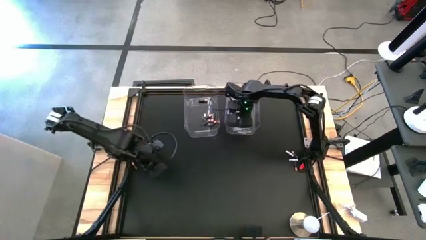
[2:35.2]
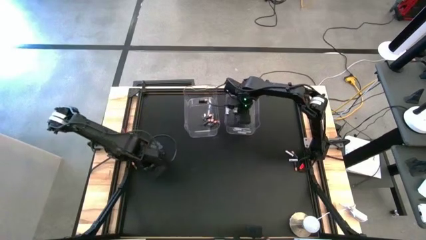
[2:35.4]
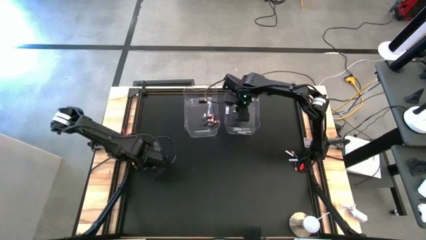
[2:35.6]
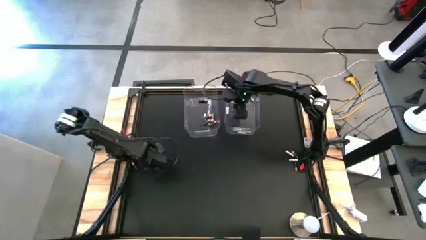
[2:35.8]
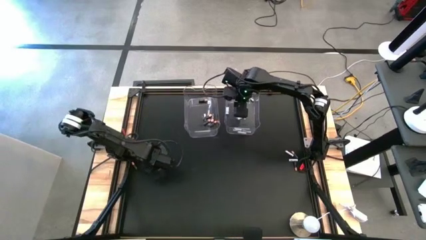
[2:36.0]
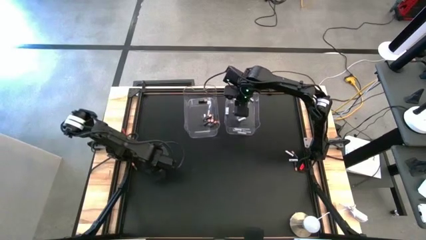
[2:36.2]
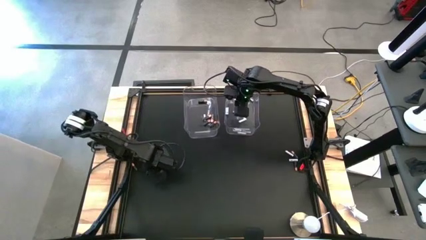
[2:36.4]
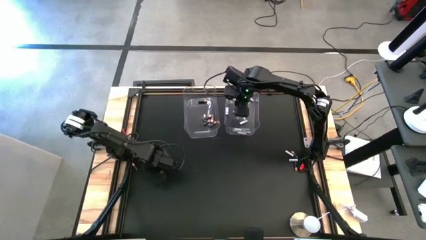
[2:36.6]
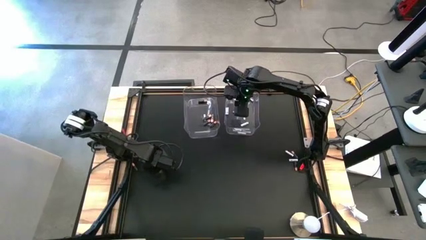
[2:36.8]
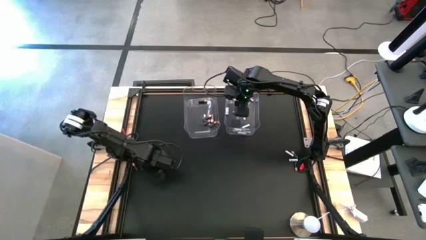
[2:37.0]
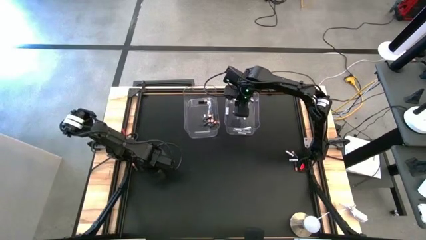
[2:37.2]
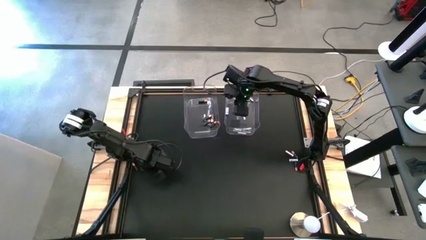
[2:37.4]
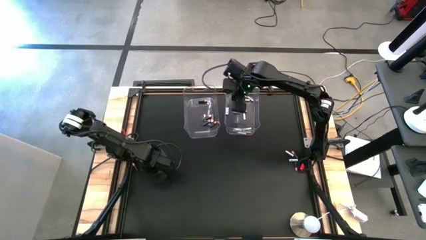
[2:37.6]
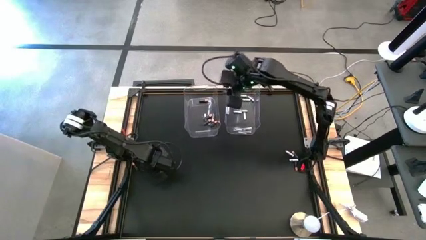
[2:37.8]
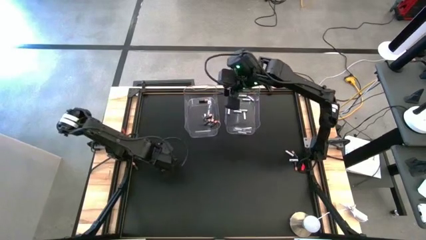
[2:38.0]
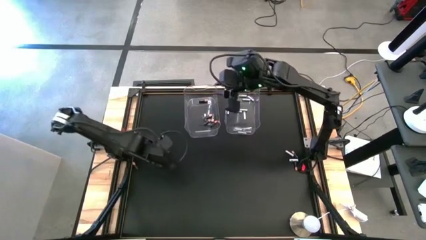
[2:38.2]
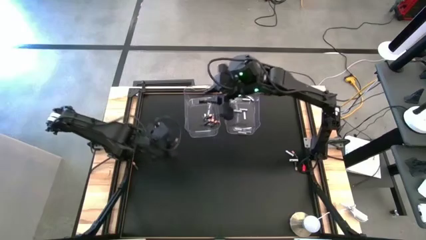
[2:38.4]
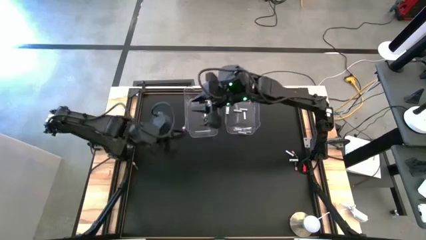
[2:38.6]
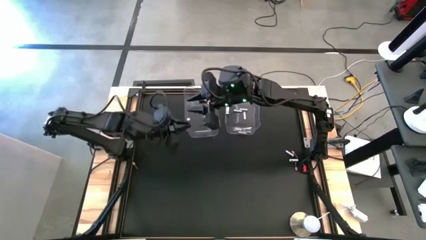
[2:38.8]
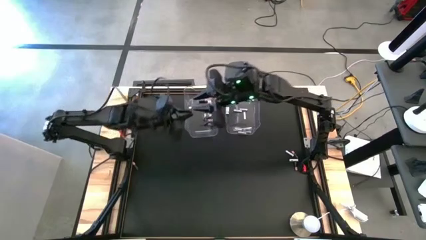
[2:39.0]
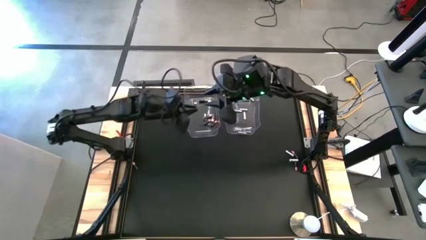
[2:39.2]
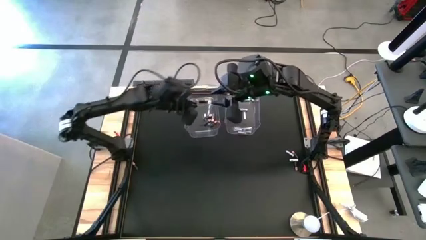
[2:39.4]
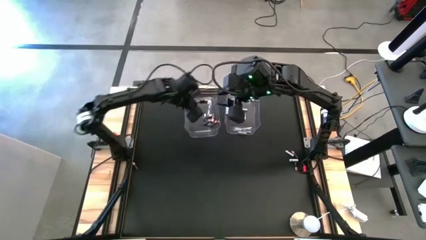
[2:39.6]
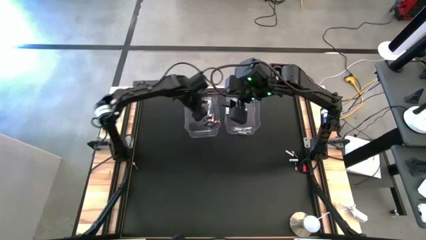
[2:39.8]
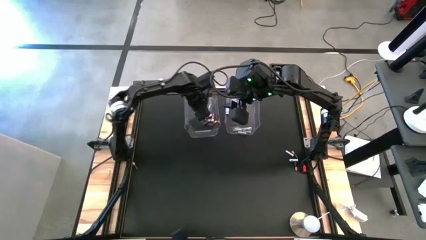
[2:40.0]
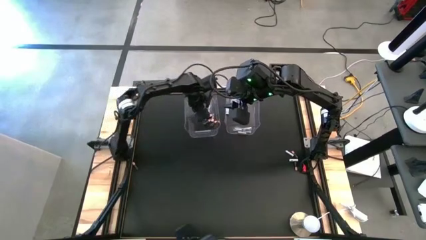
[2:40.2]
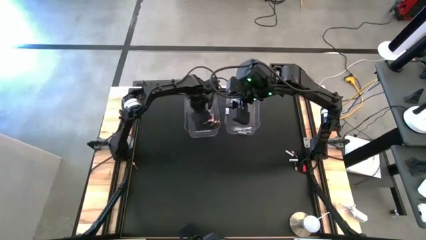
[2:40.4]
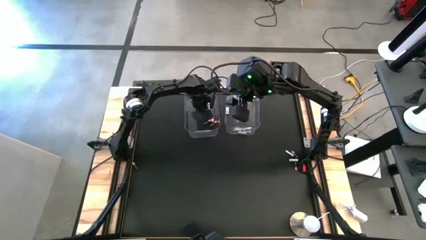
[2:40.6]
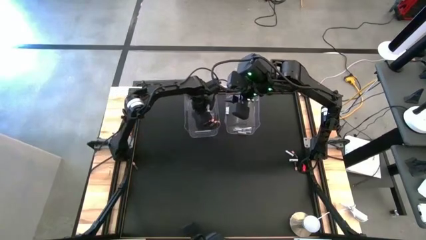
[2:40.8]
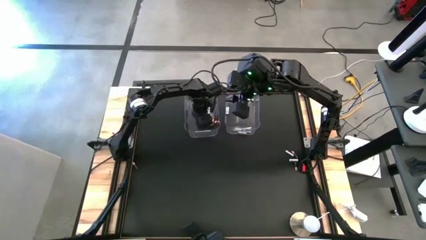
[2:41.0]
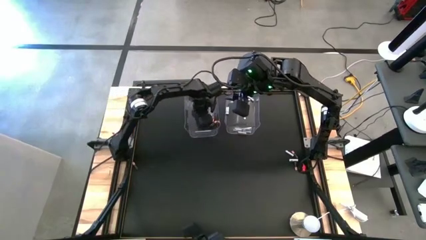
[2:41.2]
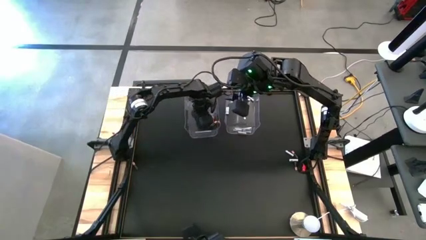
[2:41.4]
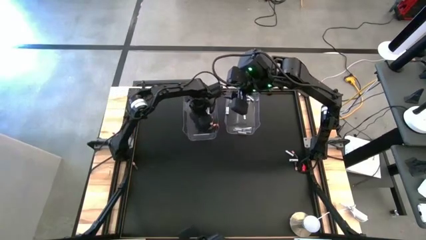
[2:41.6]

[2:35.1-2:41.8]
Task: Sort batteries
Put the black battery into the left transparent bin

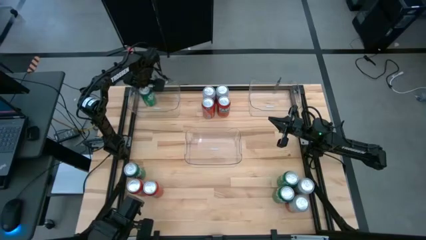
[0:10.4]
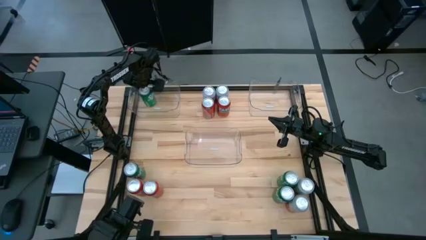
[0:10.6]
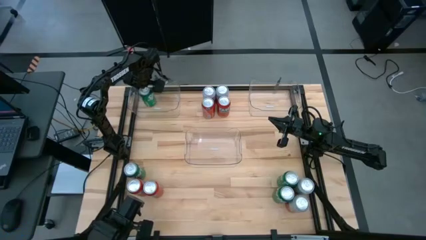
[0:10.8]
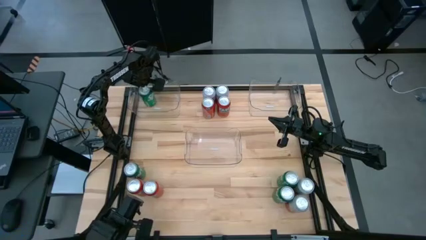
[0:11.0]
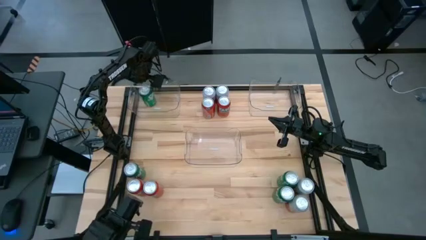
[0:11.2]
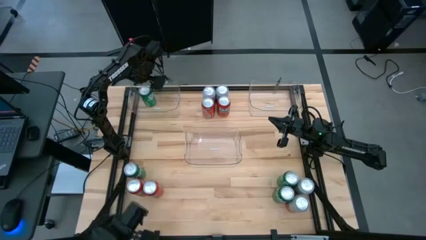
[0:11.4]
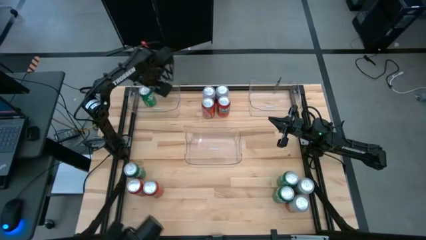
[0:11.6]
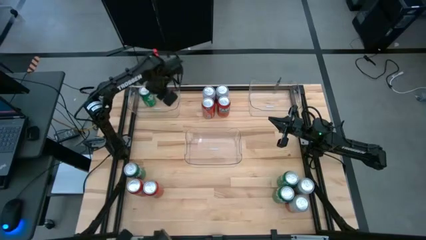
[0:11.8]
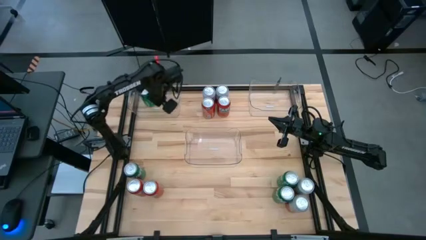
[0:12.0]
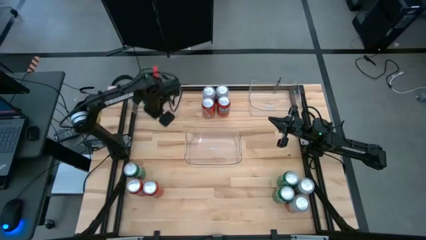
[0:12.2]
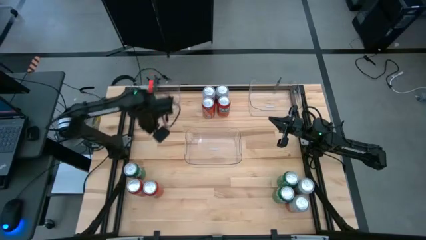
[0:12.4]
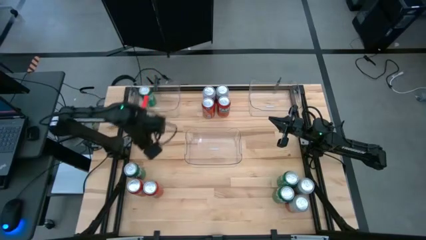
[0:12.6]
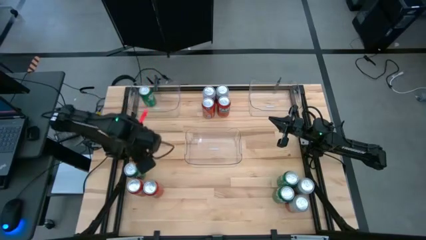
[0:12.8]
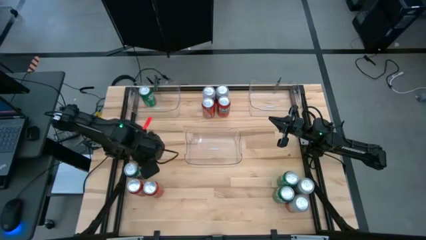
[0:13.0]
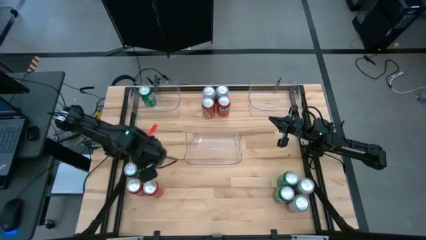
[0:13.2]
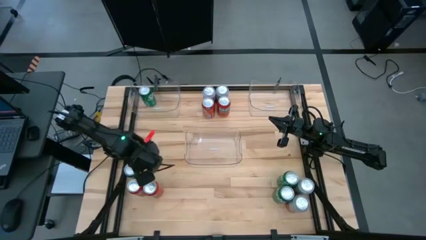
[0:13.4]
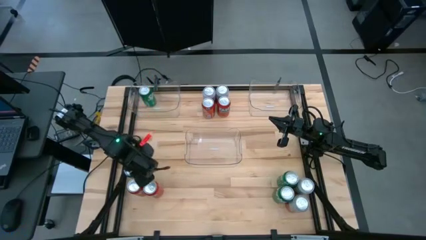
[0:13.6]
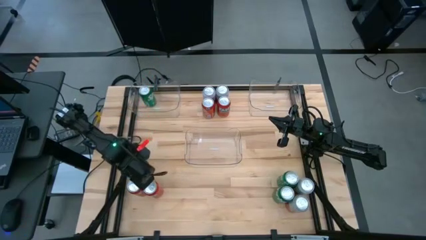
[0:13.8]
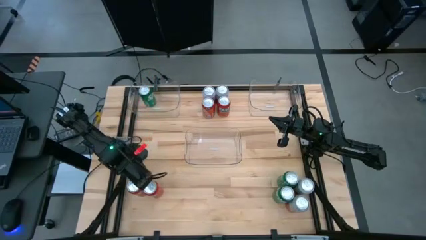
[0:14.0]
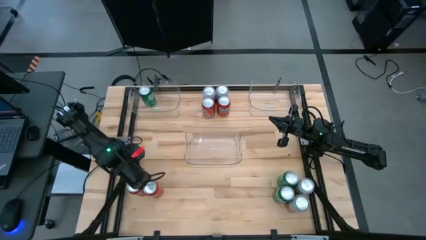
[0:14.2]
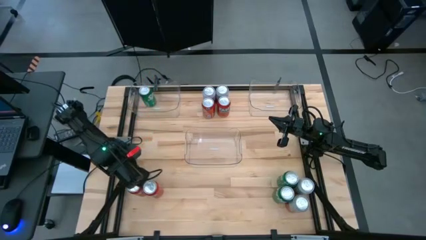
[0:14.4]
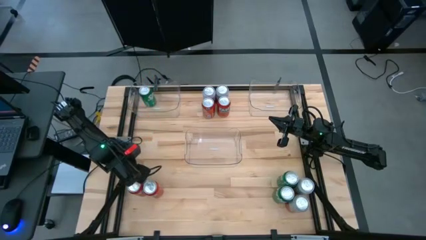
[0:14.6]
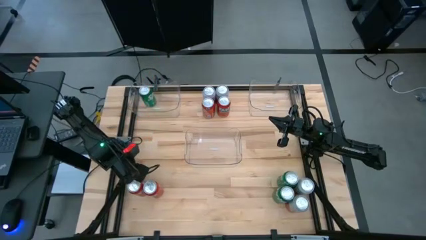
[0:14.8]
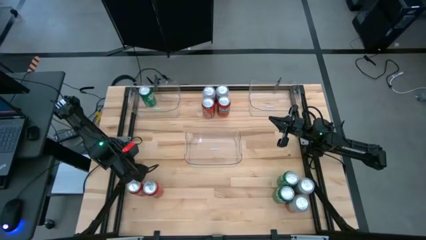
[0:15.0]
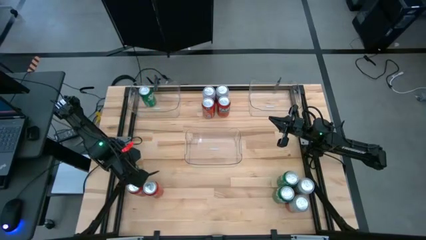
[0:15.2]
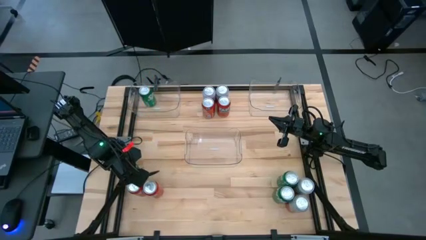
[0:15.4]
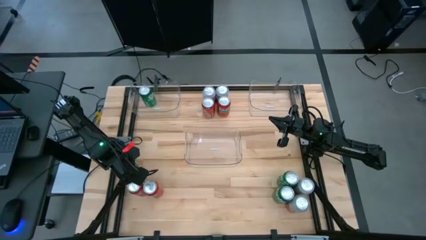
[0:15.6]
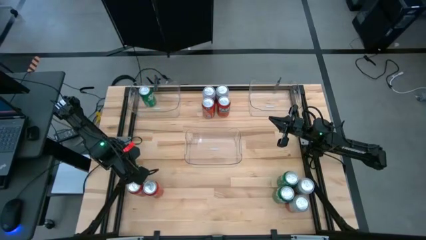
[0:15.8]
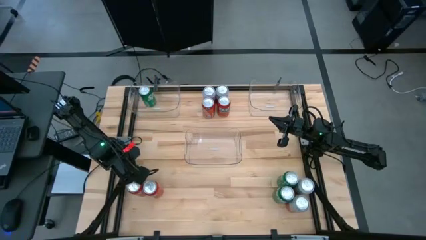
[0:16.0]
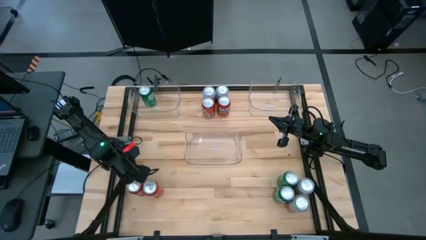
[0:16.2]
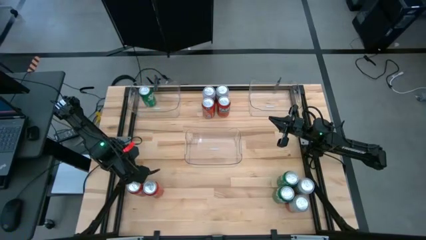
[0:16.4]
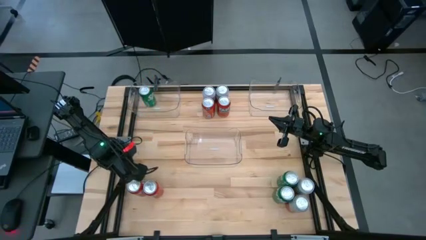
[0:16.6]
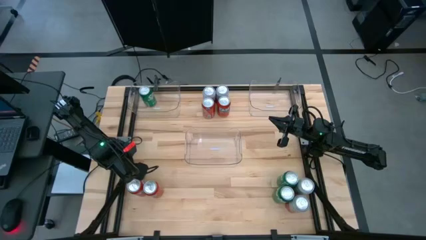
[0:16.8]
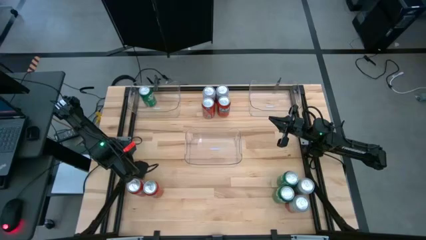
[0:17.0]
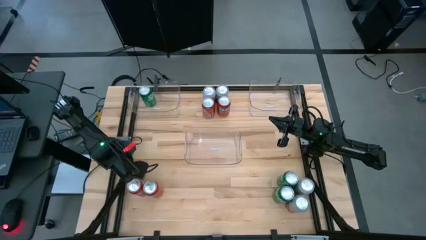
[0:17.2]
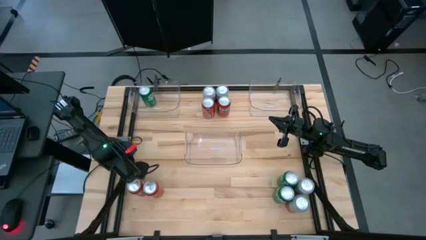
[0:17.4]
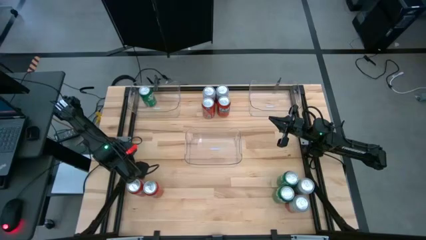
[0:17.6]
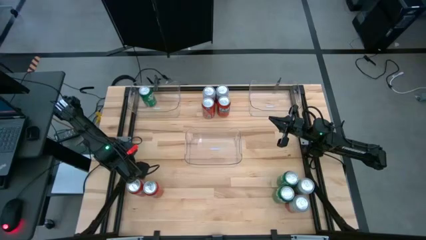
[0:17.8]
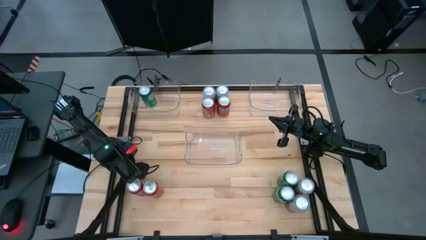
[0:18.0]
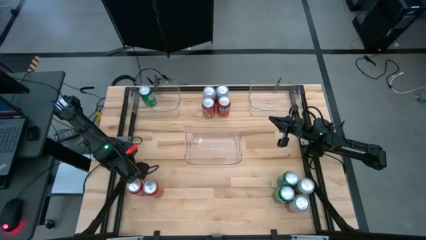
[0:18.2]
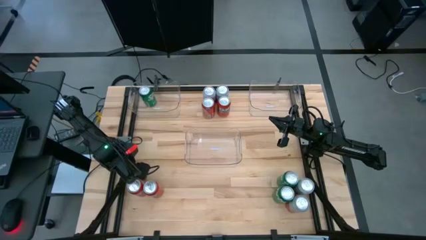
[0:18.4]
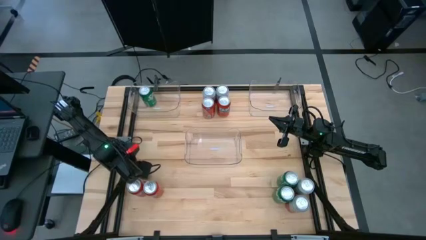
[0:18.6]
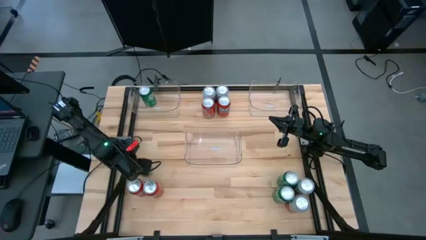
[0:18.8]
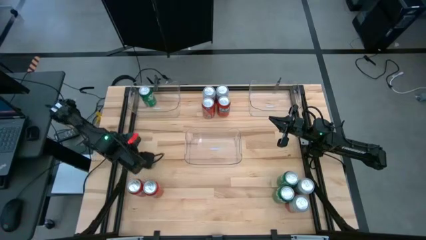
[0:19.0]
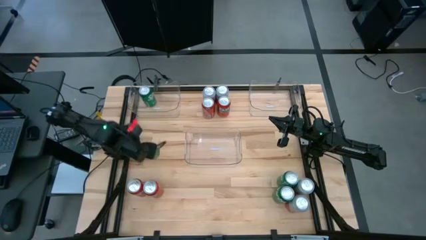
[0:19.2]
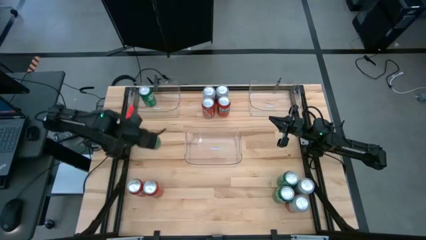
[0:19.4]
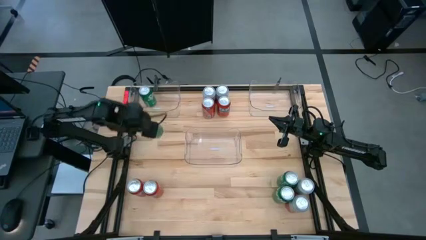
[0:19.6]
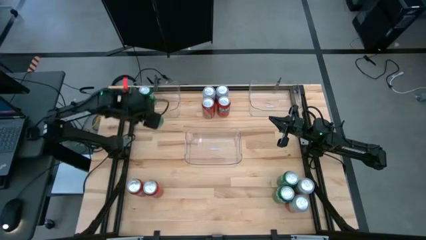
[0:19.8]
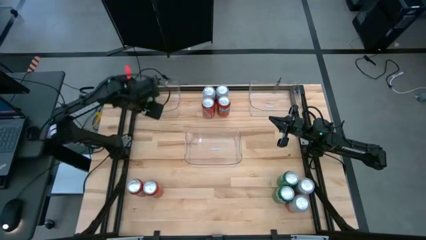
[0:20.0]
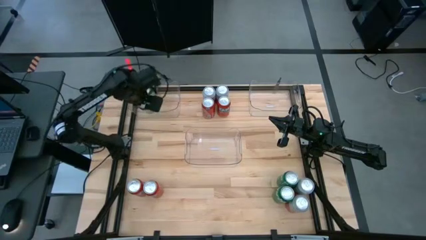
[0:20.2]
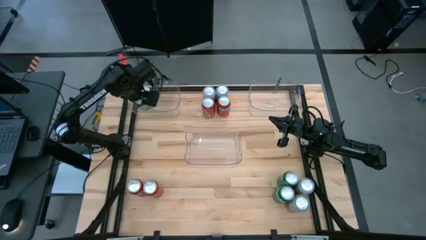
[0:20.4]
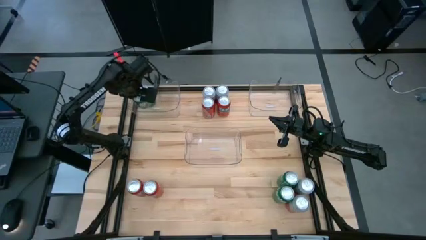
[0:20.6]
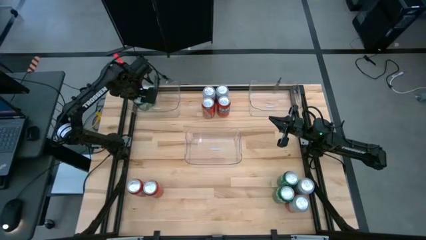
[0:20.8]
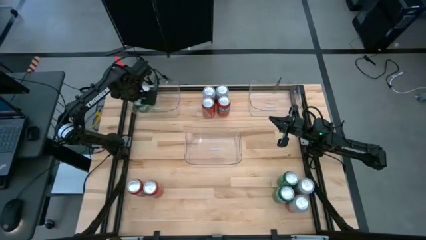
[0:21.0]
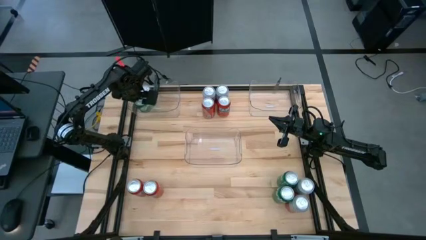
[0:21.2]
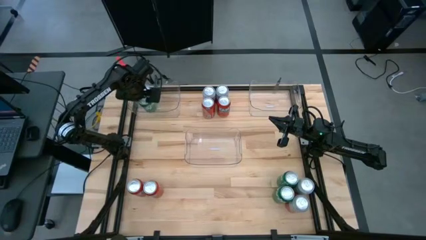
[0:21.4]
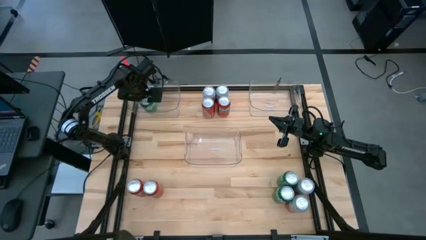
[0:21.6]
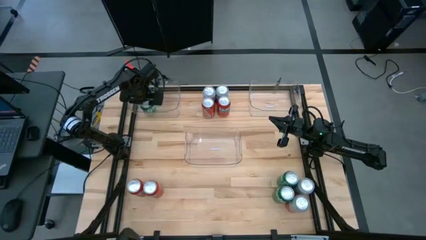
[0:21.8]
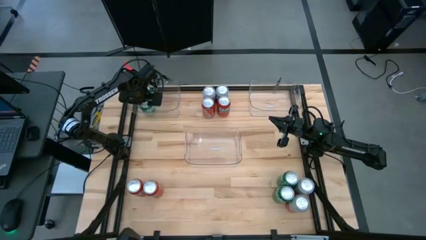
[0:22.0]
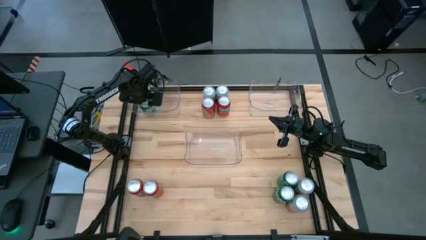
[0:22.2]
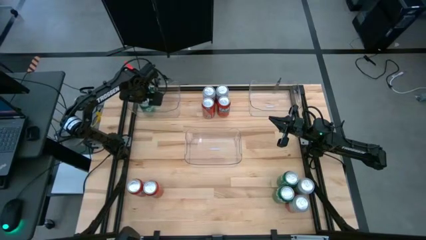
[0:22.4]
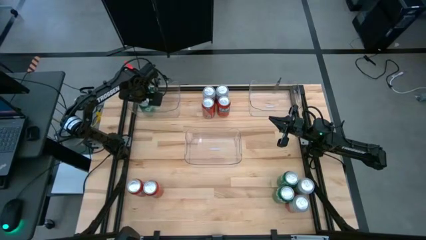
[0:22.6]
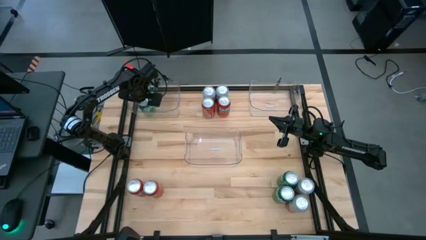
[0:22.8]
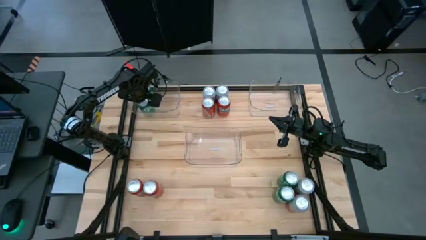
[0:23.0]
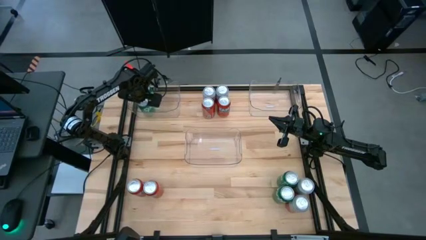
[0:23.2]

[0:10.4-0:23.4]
Task: Sort soda cans
Put the green soda can into the top left transparent bin
